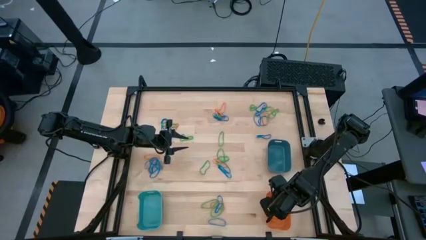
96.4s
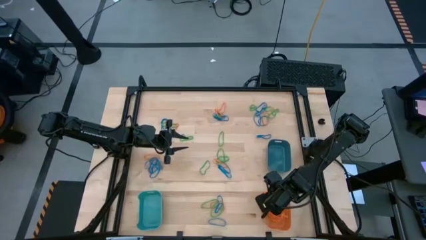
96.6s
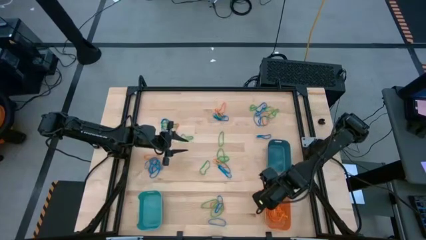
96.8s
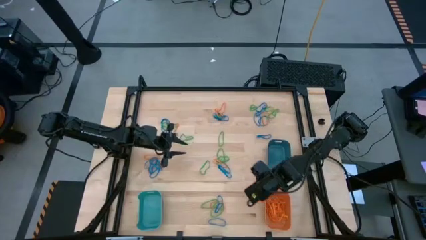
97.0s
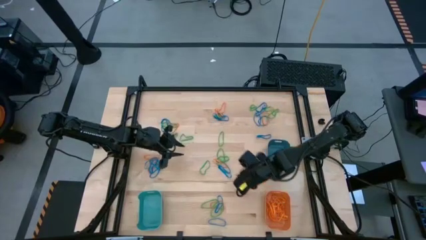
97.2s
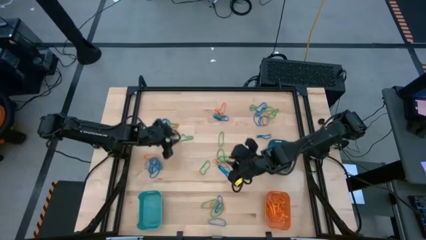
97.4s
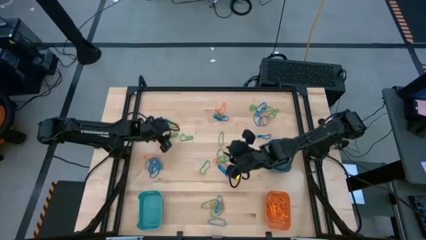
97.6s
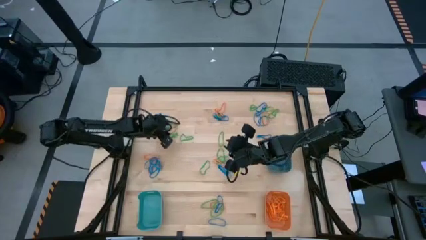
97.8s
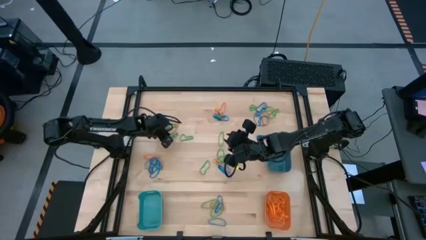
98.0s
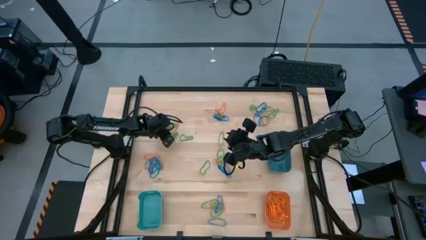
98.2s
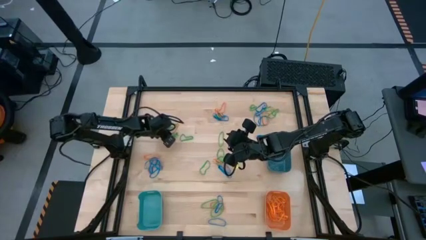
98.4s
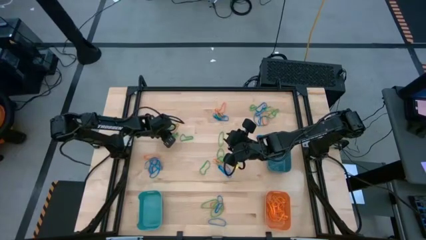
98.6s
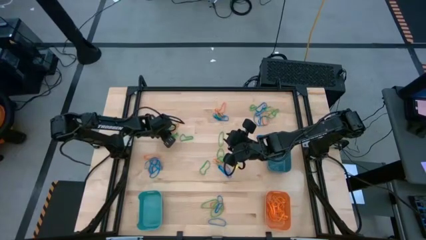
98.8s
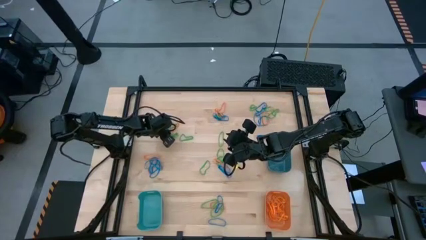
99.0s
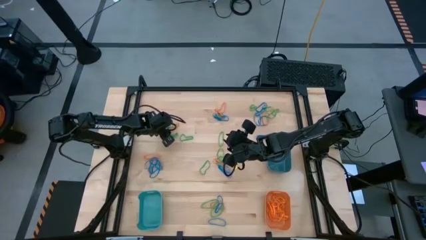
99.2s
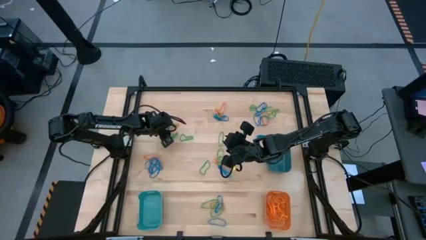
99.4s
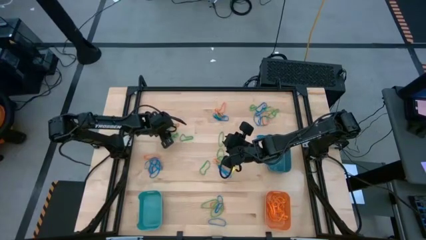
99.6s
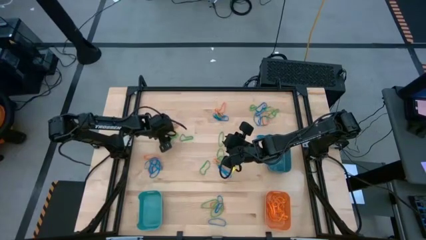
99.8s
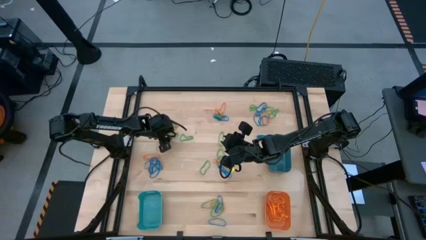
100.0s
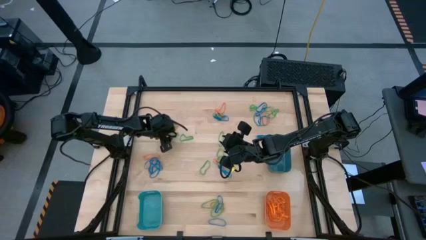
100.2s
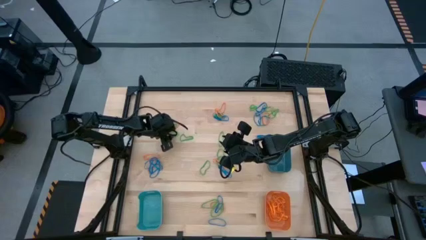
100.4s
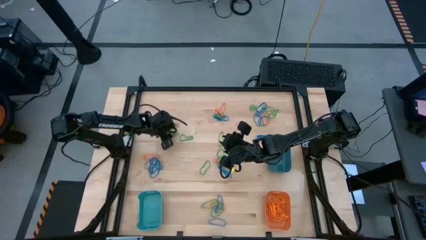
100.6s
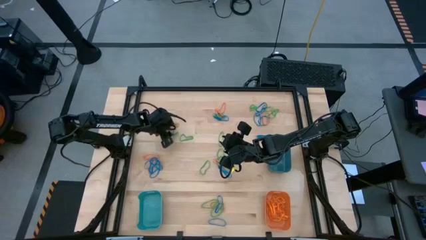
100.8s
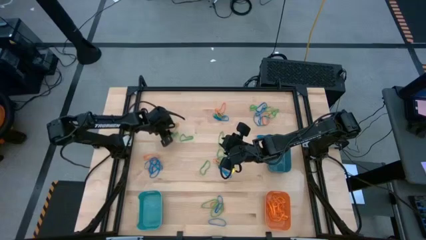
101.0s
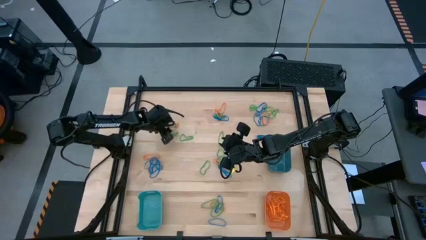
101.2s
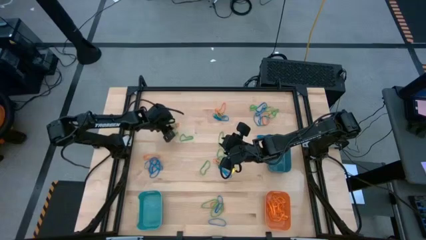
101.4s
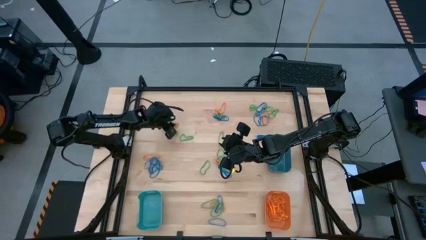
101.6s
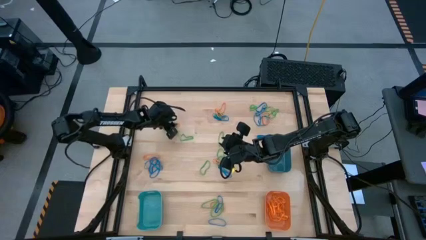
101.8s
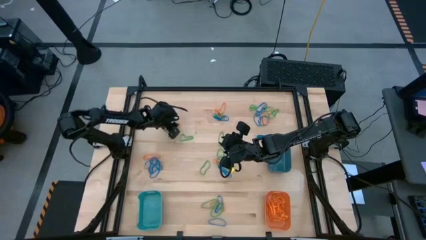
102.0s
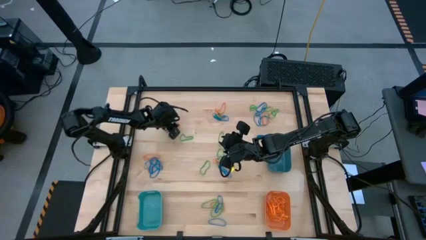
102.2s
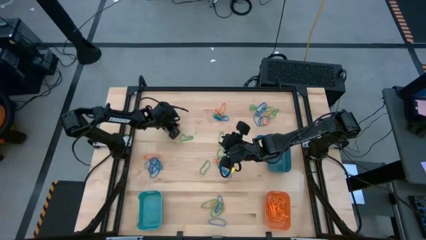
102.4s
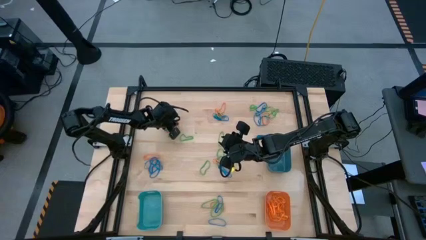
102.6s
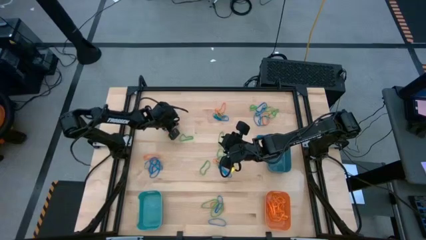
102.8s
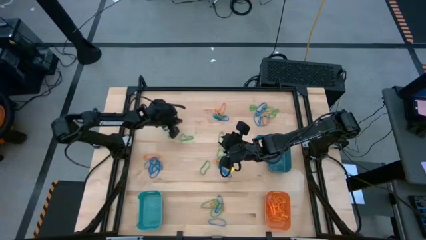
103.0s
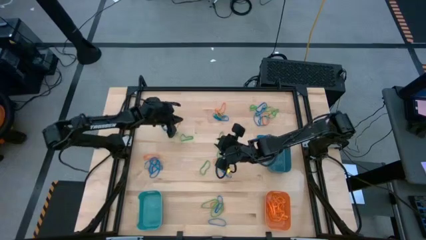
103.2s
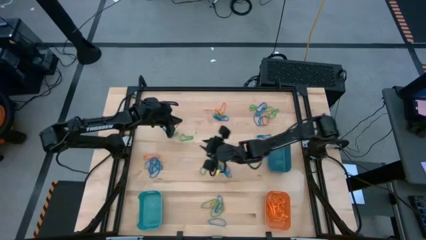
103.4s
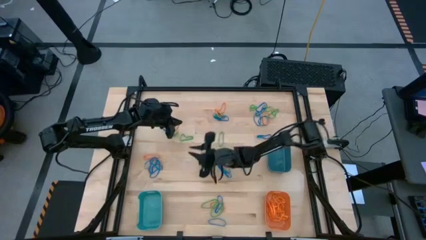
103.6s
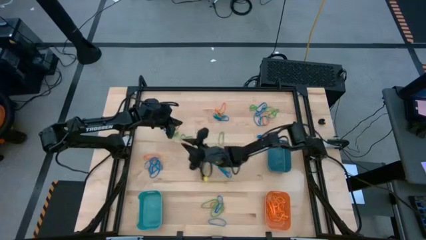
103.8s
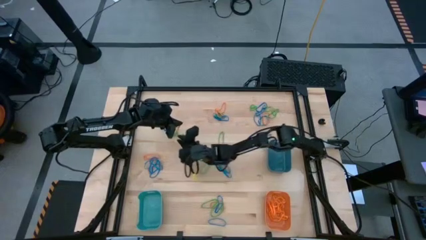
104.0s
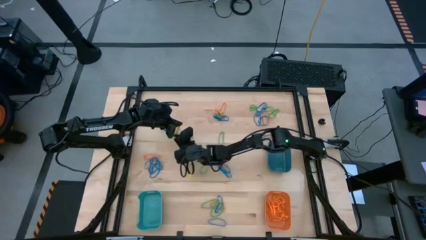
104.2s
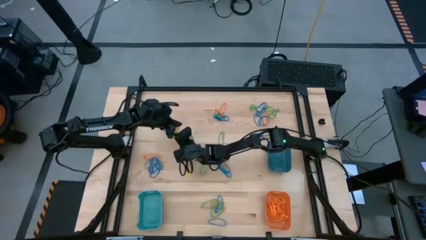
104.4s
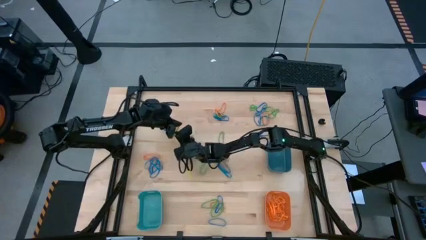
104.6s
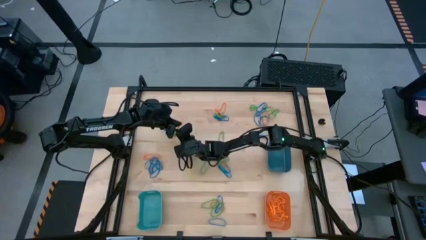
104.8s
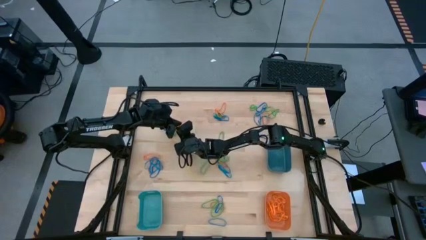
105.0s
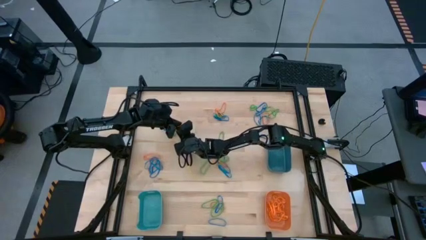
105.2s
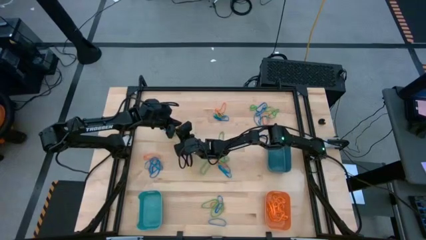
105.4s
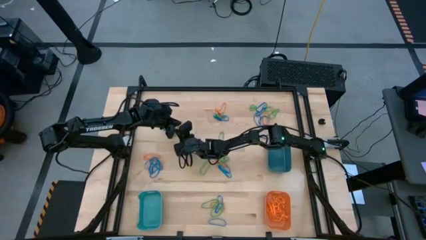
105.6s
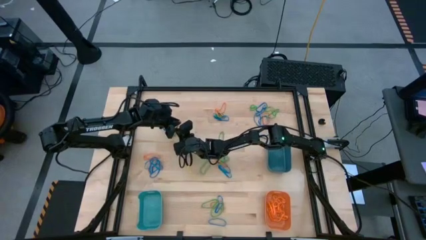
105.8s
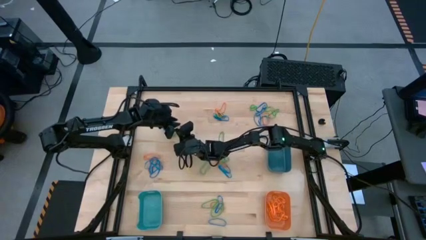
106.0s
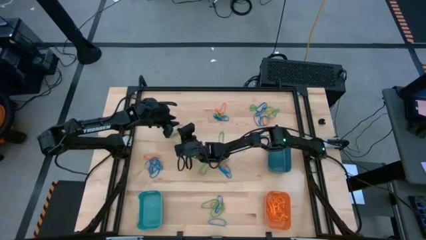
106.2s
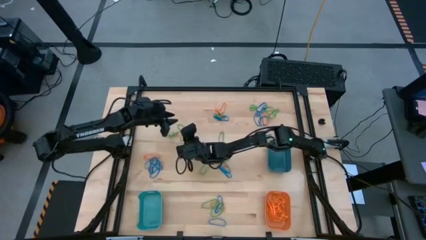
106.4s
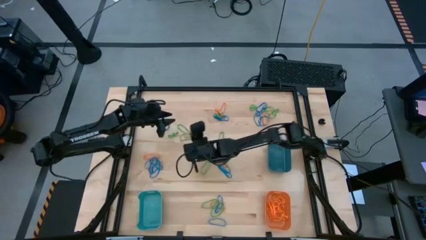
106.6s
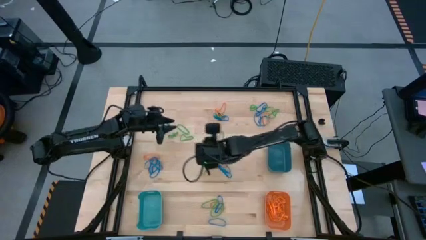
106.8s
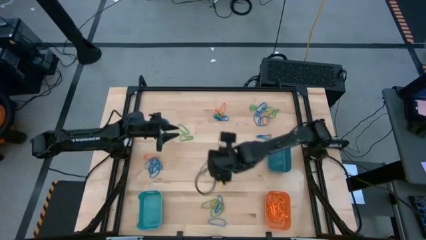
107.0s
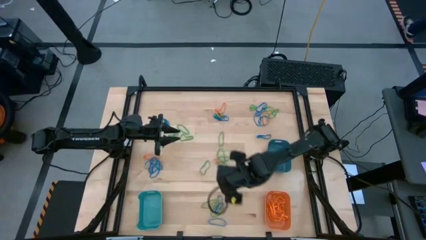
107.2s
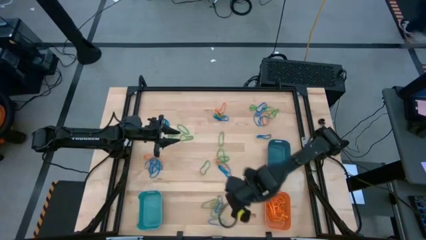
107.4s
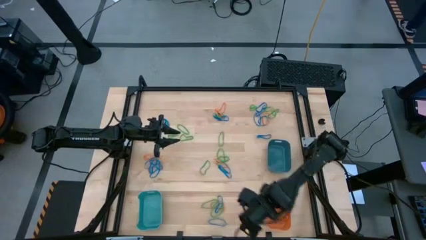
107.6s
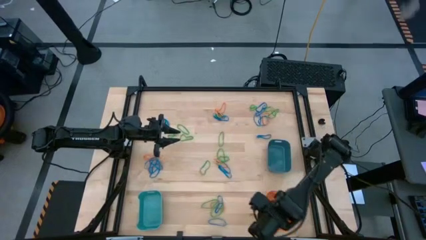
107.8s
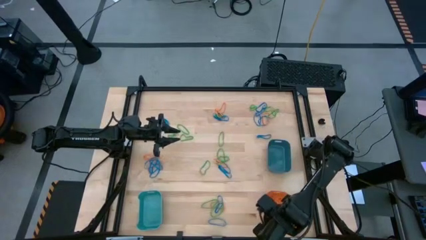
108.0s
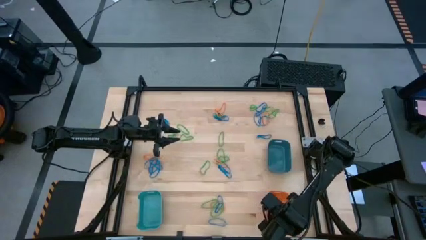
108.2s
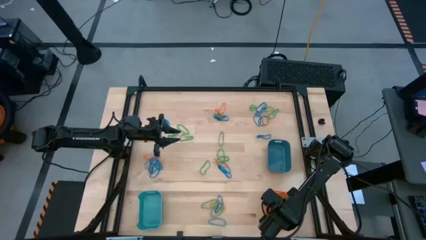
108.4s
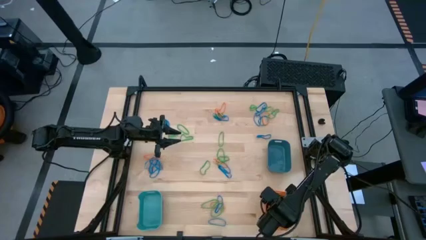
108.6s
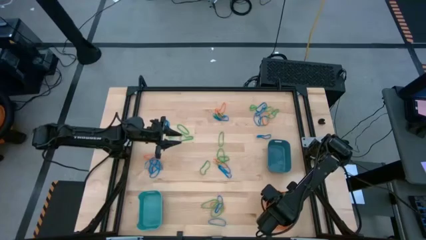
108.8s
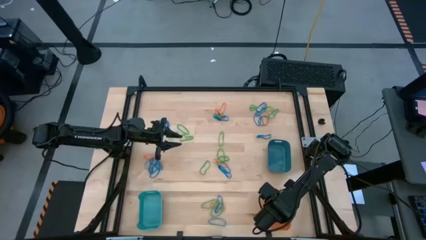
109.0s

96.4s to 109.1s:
Task: Sort rubber bands into baskets
Put the orange rubber band into the orange bin

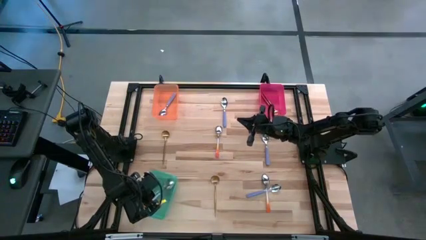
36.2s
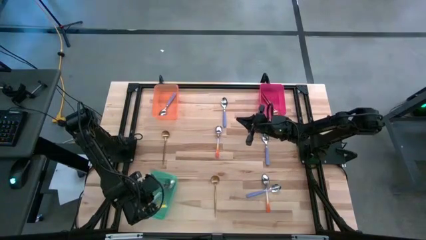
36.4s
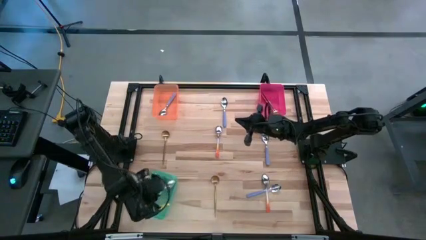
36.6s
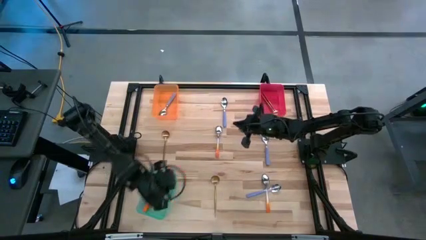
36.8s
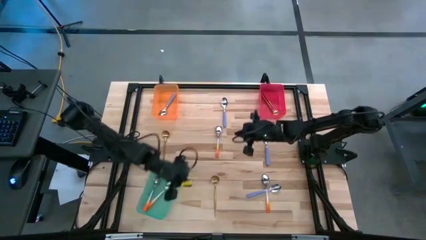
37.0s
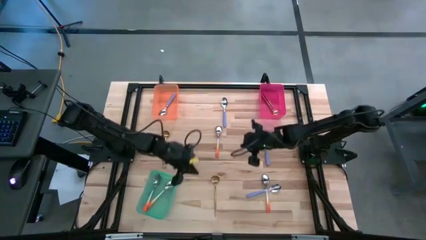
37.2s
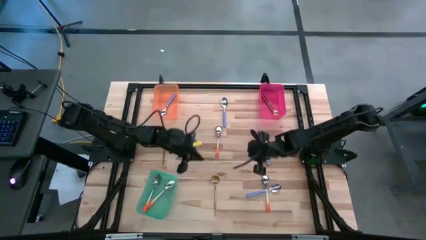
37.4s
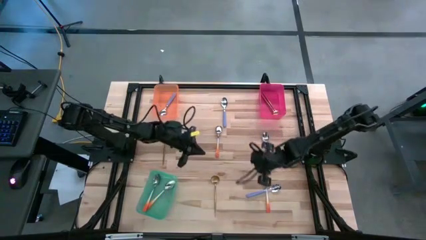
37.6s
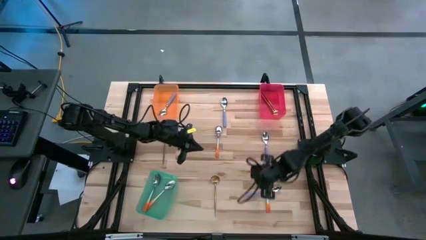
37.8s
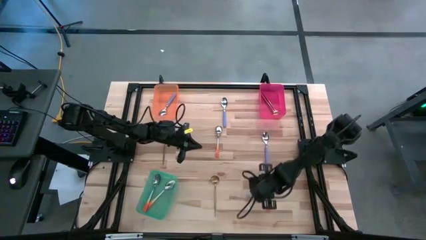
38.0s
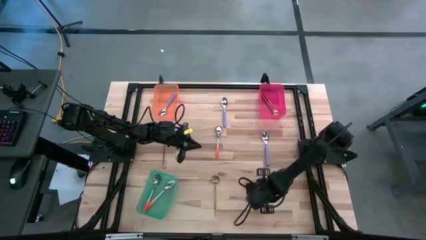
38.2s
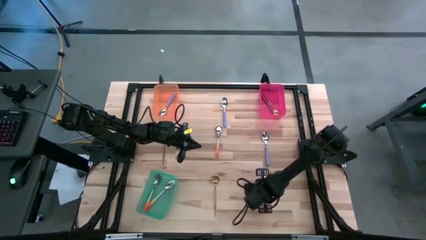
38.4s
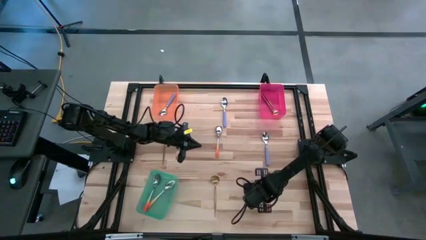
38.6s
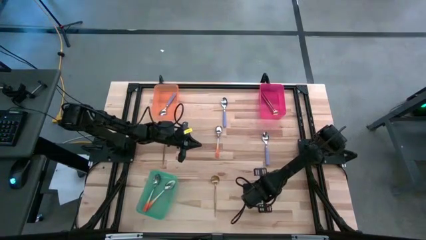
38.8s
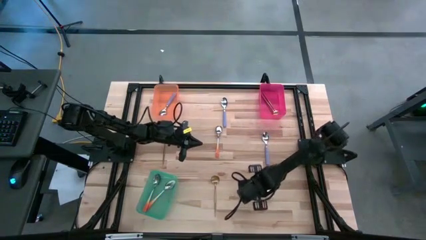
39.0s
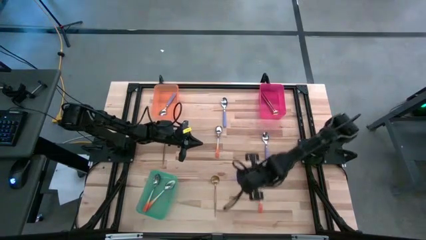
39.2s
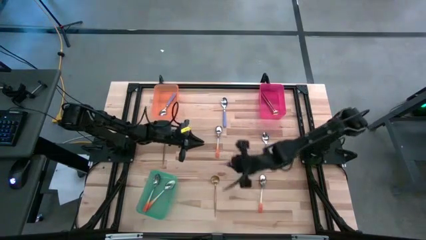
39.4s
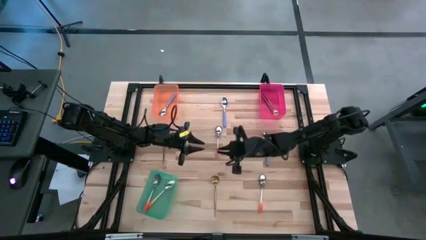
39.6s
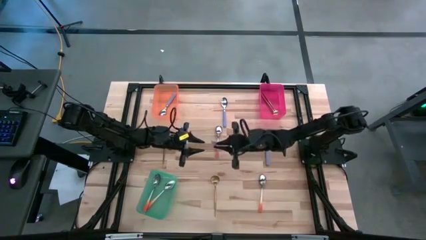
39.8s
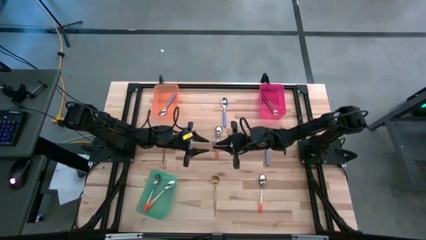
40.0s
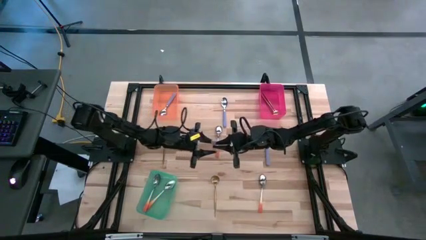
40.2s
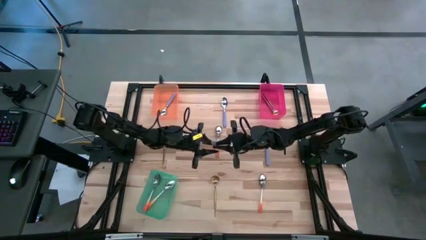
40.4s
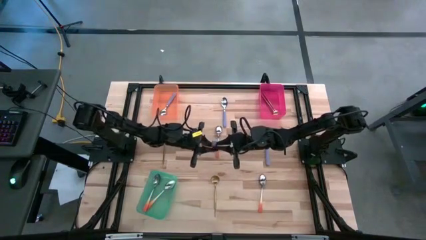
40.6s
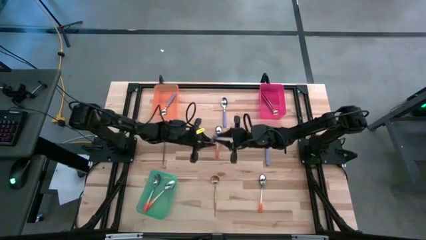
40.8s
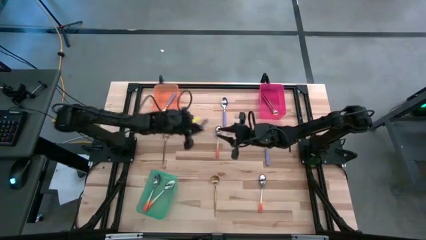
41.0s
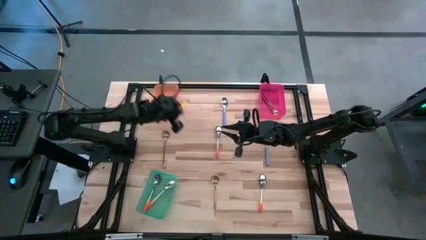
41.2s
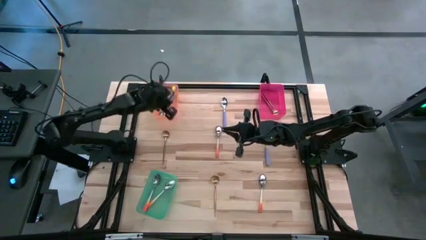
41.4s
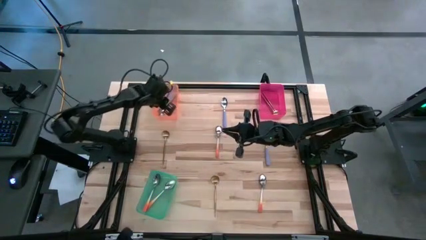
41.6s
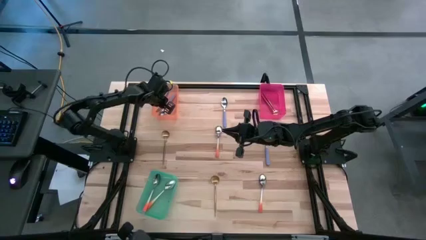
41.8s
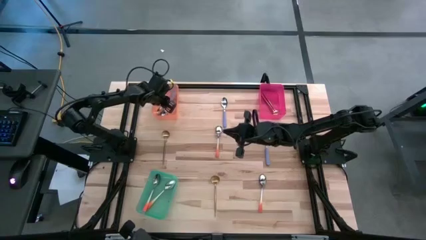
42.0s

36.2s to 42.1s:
Task: Sort silverware by color (type)
Put the purple spoon into the orange bin
